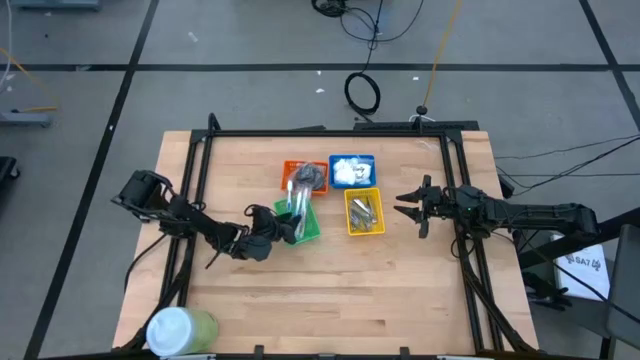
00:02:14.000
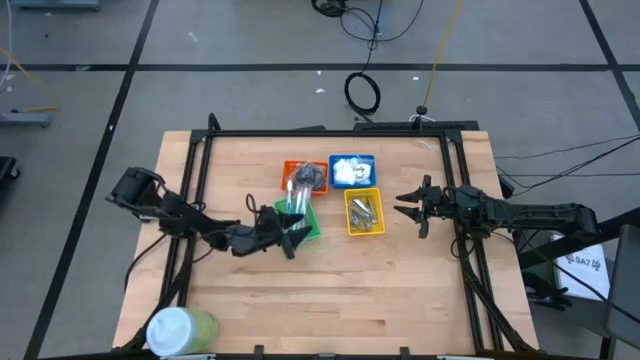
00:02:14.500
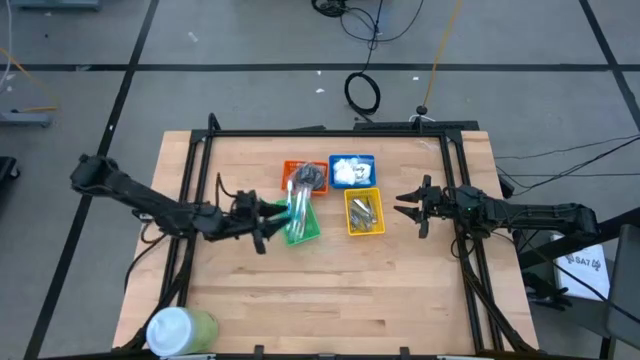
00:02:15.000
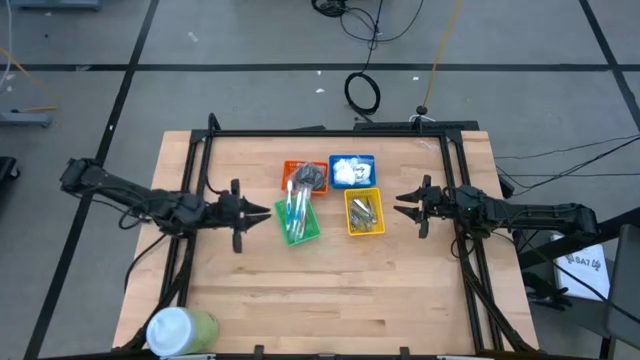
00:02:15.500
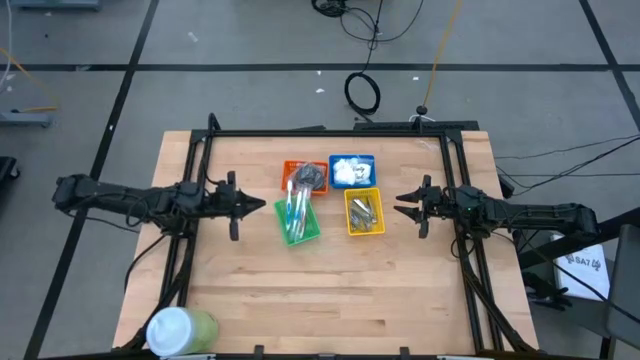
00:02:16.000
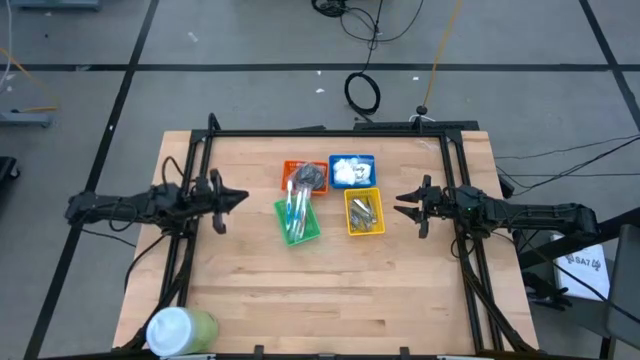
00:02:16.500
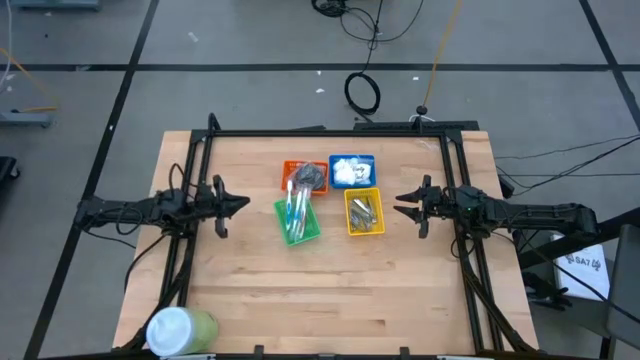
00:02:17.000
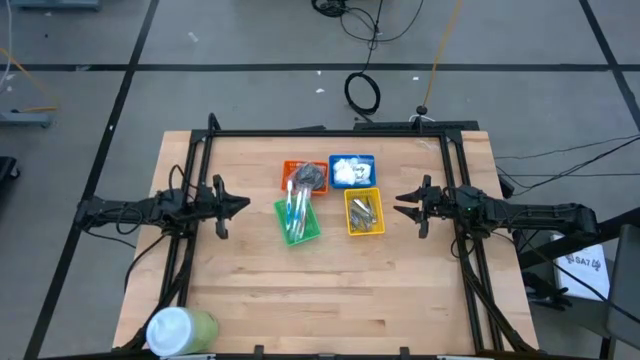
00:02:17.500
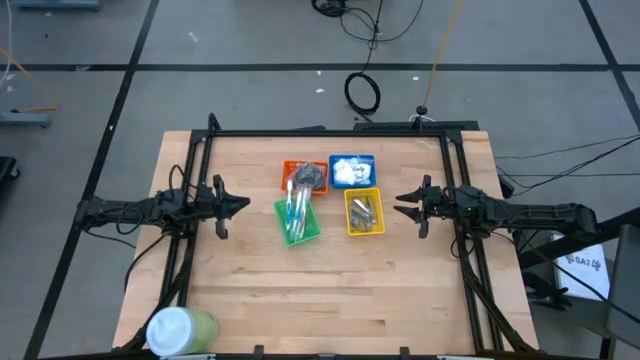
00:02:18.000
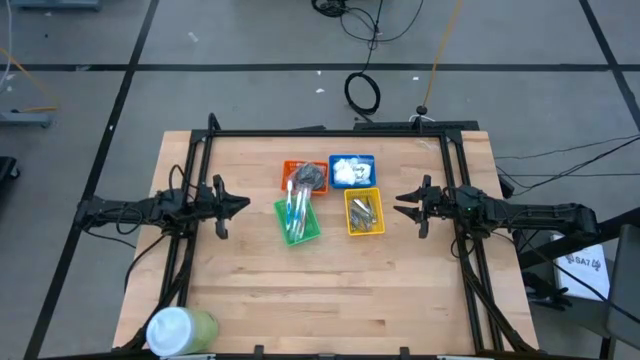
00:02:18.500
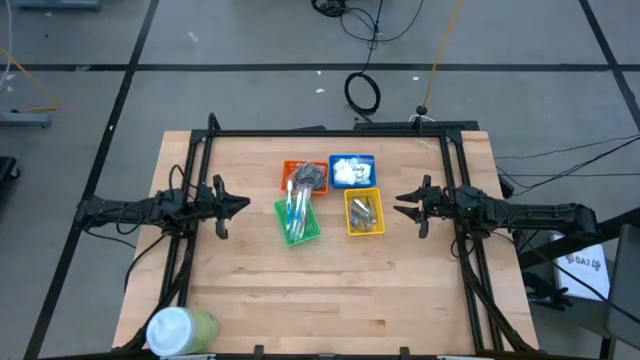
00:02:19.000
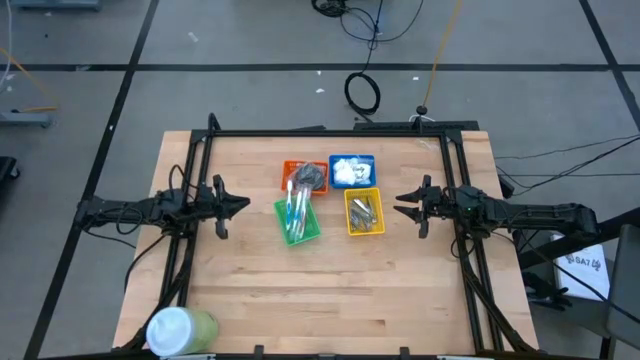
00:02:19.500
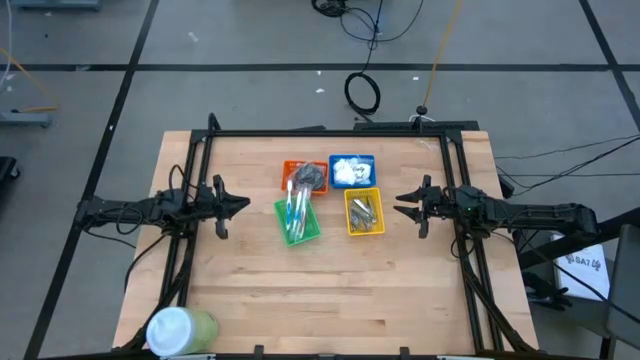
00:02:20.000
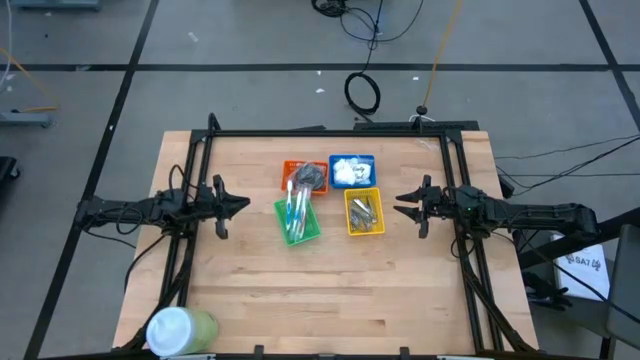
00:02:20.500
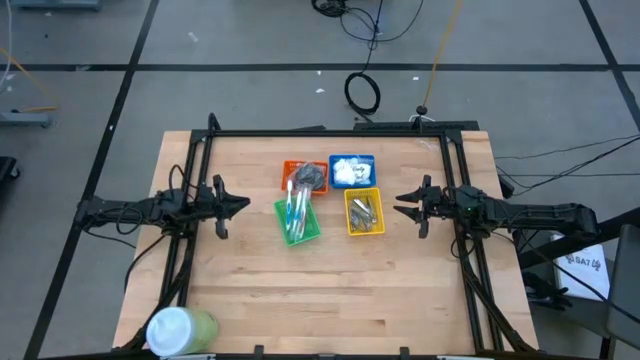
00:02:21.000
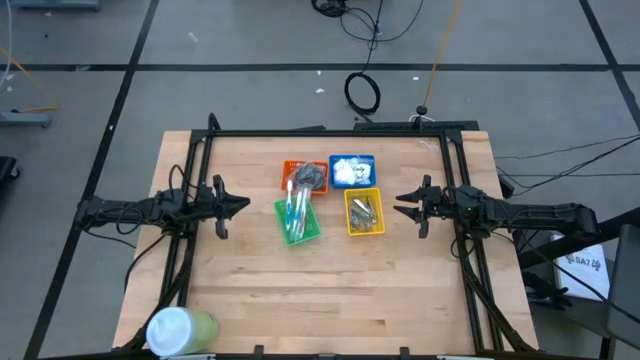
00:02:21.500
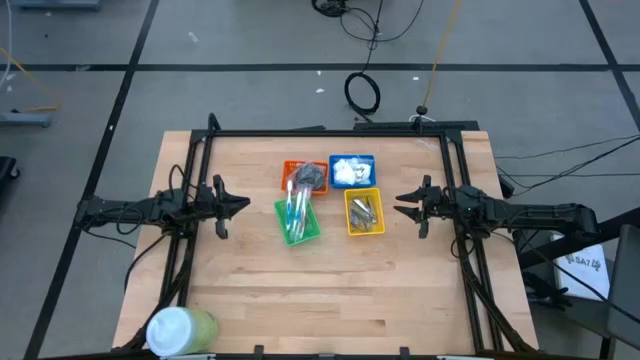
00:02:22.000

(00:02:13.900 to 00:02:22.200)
Task: Pick & Place Travel size toiletries
Return to Home Position

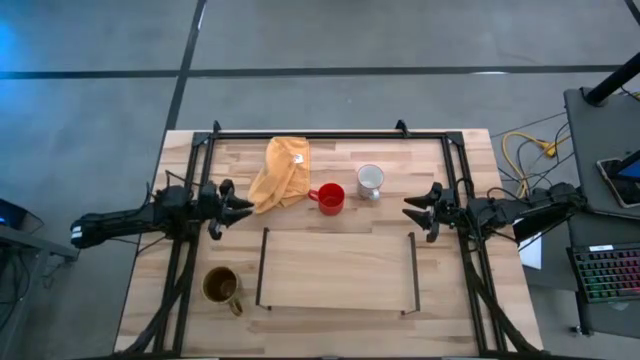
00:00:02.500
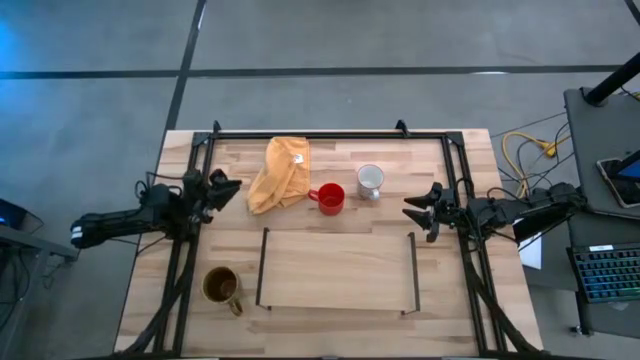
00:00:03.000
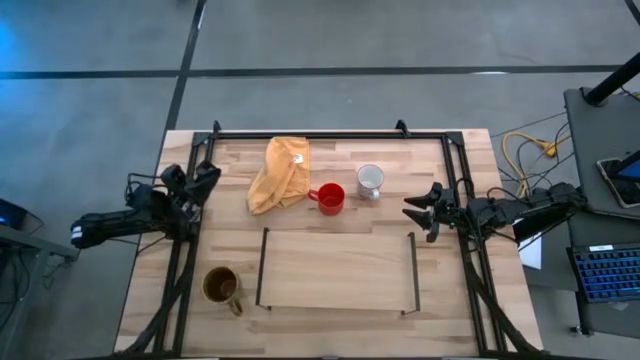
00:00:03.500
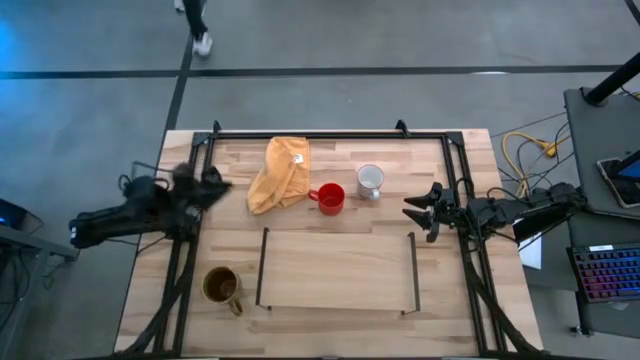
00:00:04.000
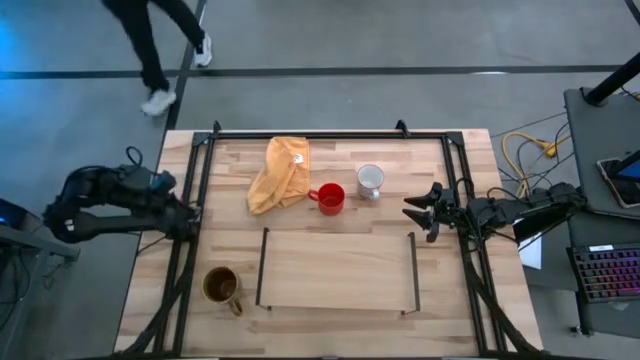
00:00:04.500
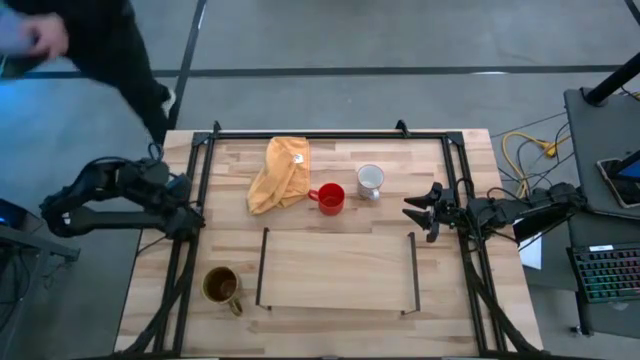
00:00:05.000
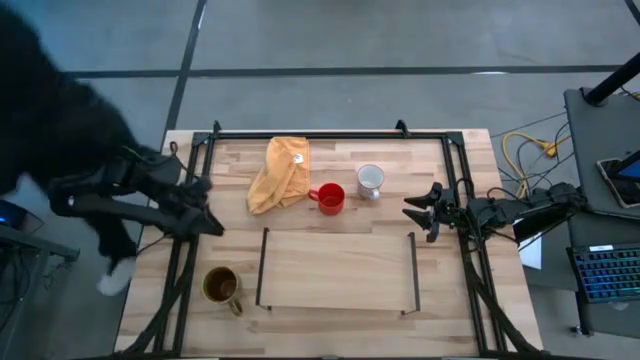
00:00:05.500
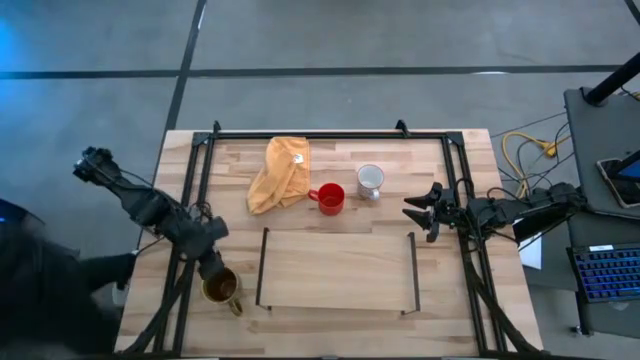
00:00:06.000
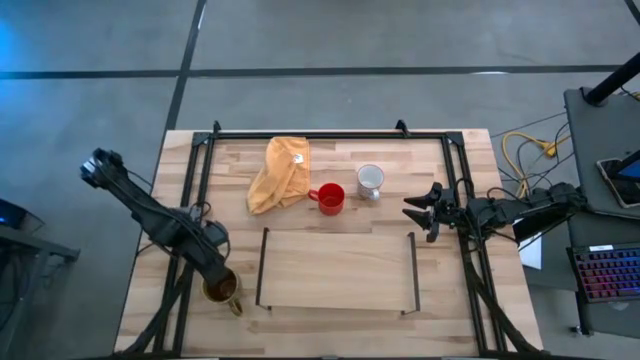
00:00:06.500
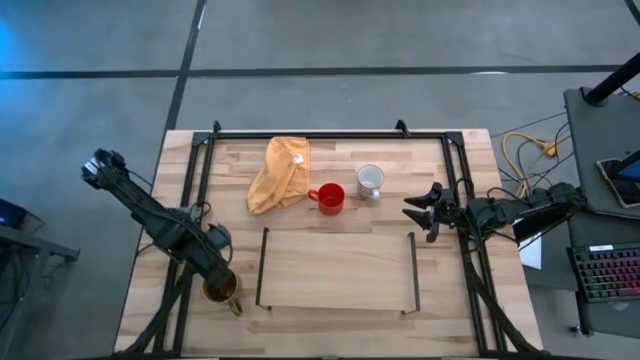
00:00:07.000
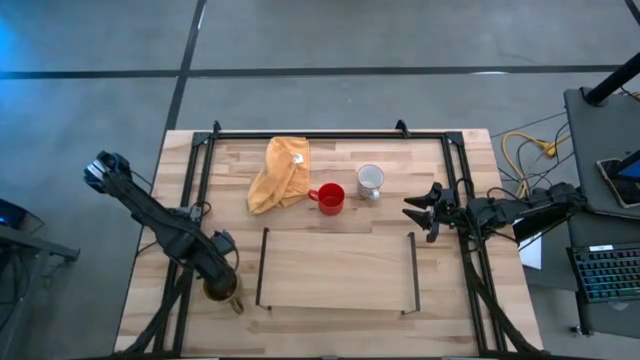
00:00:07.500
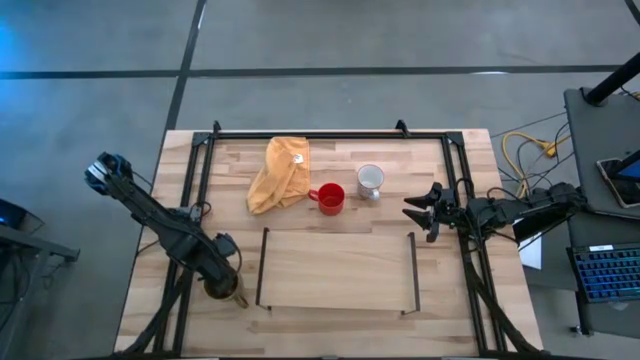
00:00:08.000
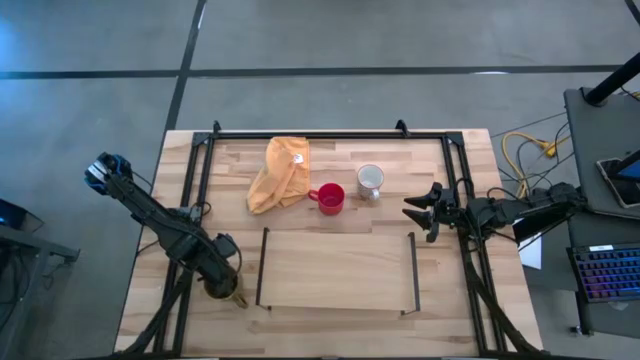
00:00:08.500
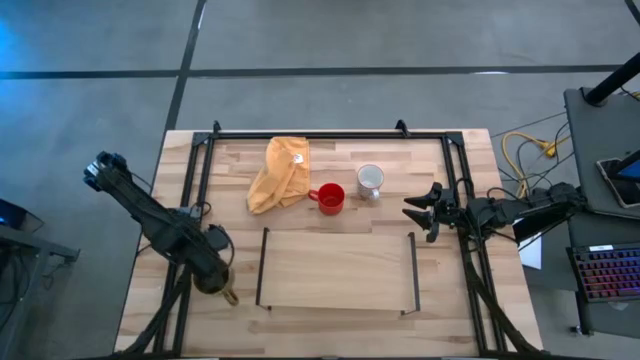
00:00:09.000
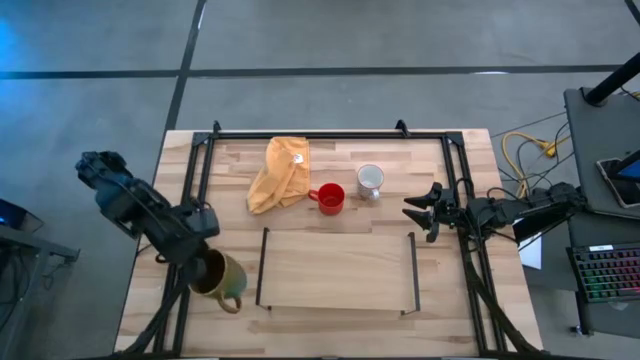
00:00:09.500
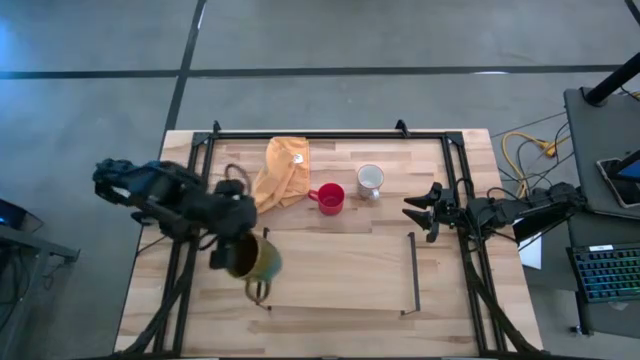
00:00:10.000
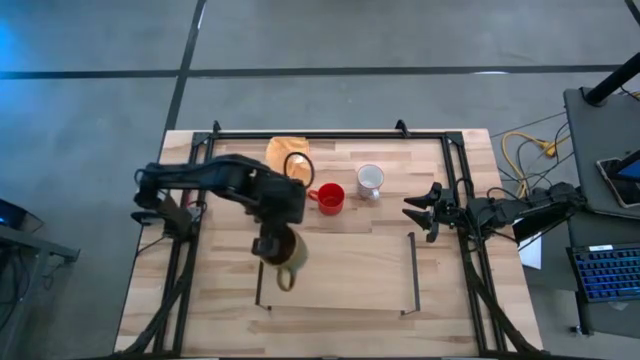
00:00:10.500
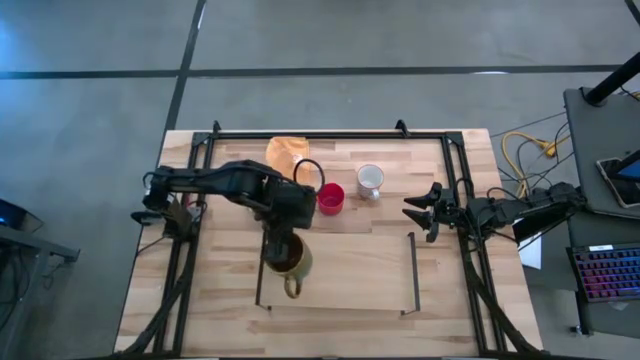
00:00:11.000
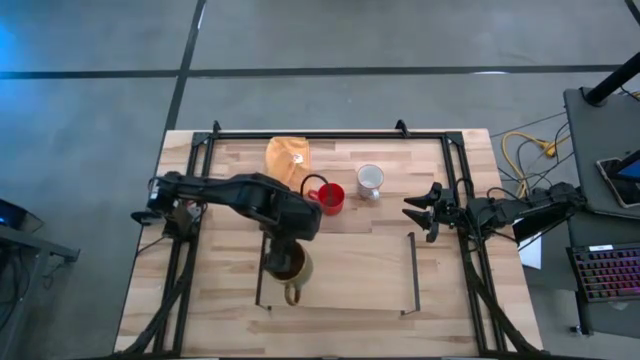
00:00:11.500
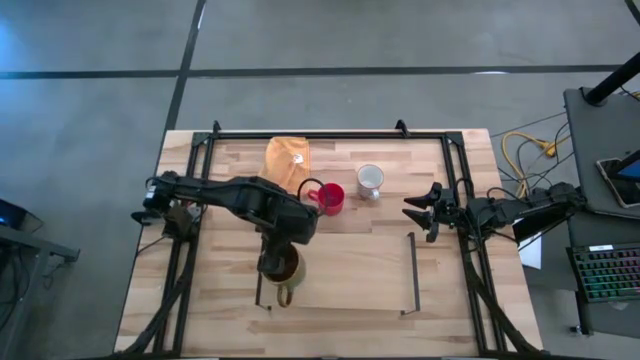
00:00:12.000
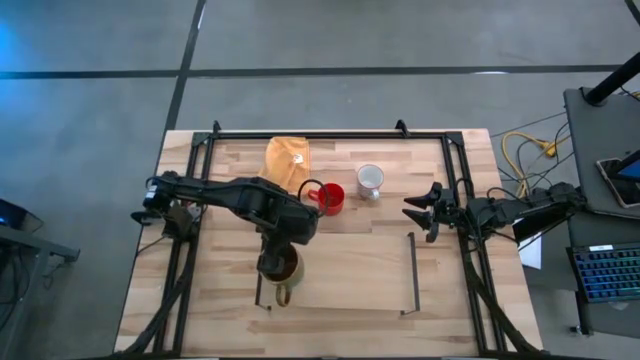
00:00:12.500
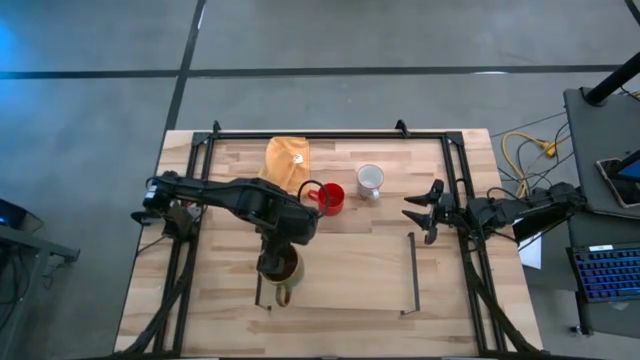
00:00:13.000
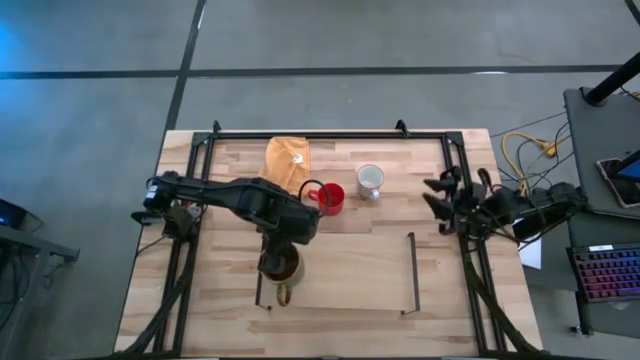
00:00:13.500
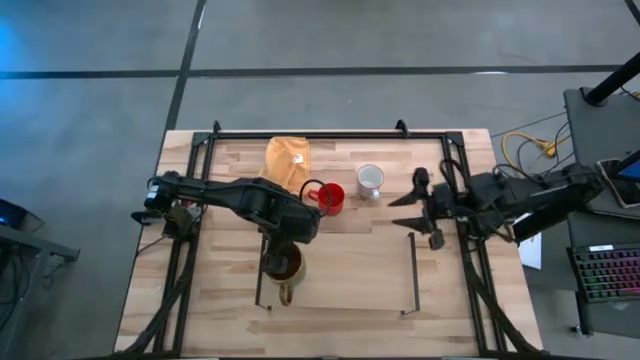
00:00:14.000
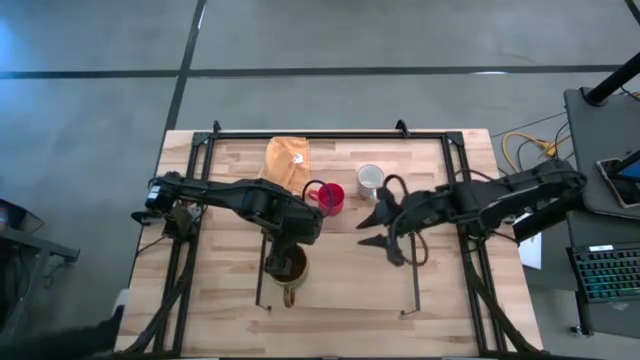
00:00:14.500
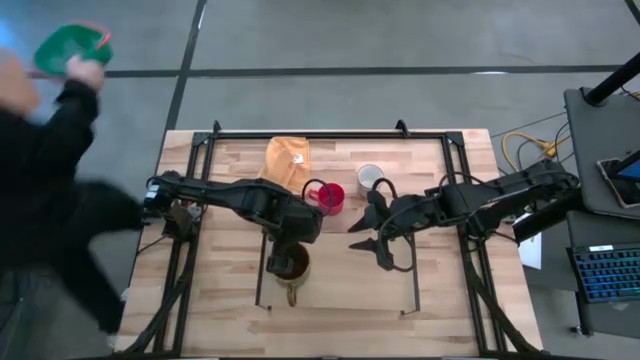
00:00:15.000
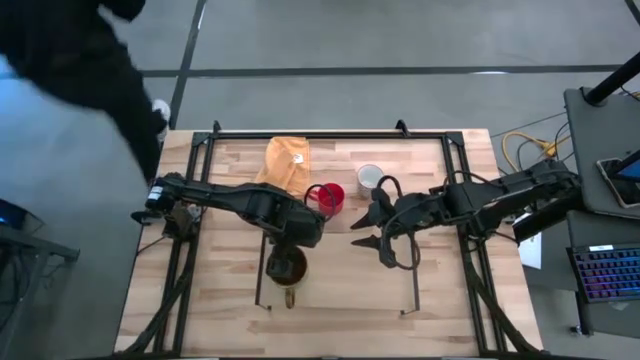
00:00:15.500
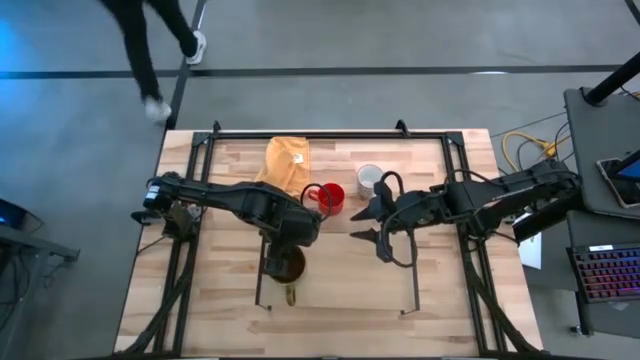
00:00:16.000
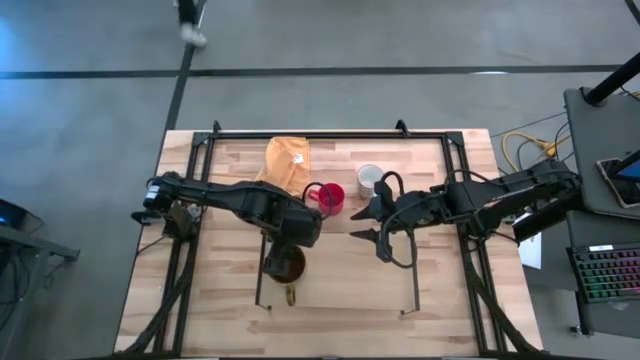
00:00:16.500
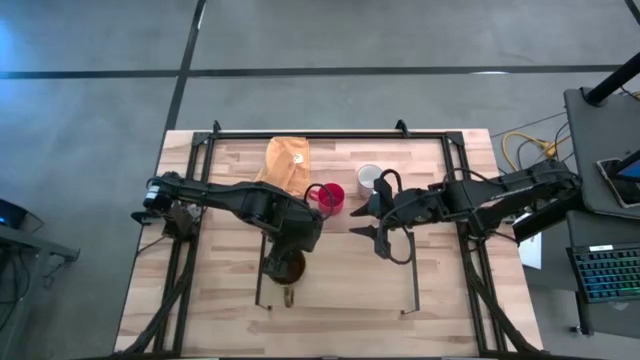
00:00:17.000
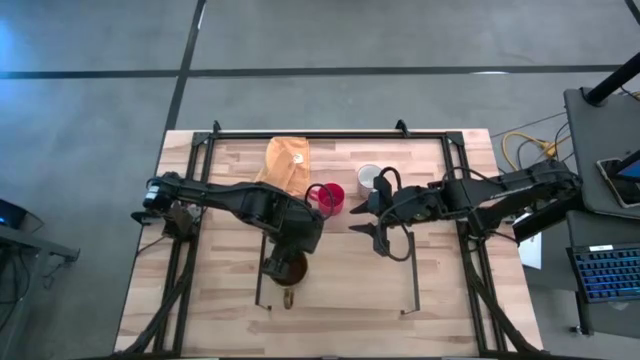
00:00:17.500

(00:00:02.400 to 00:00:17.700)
Task: Stack small to large cups/mugs on shelf
Put the green mug on the shelf
